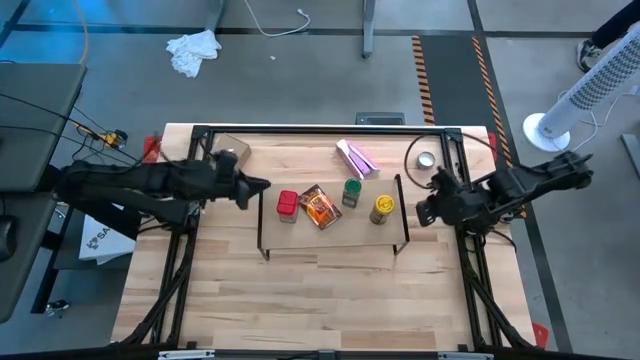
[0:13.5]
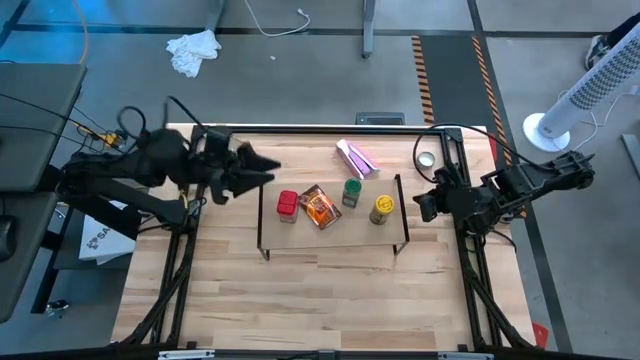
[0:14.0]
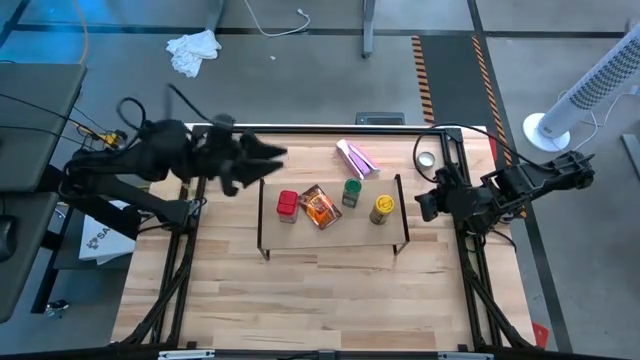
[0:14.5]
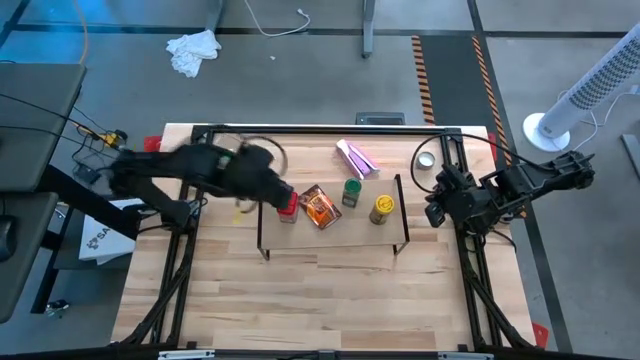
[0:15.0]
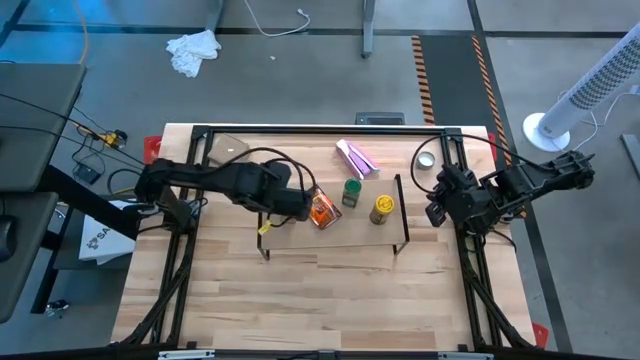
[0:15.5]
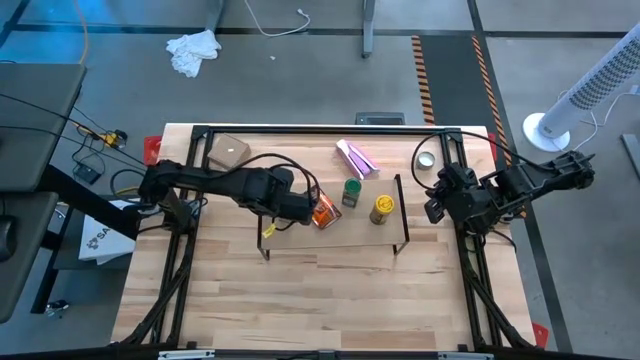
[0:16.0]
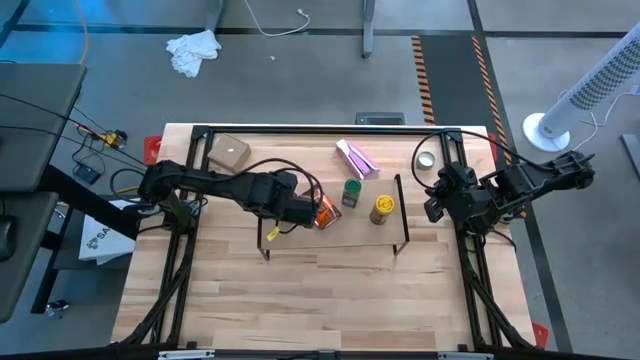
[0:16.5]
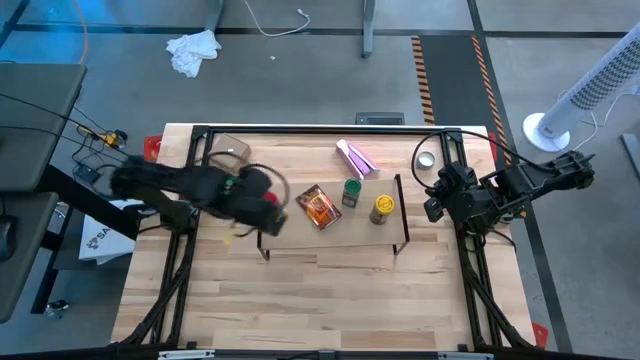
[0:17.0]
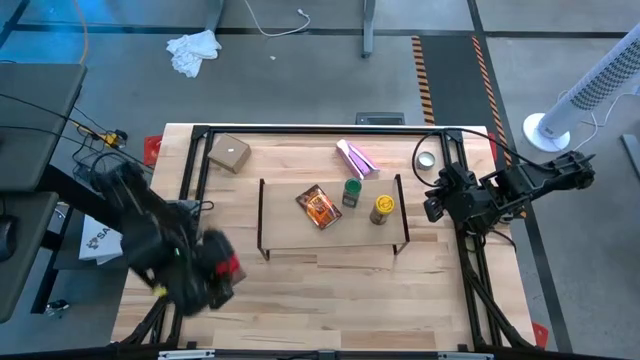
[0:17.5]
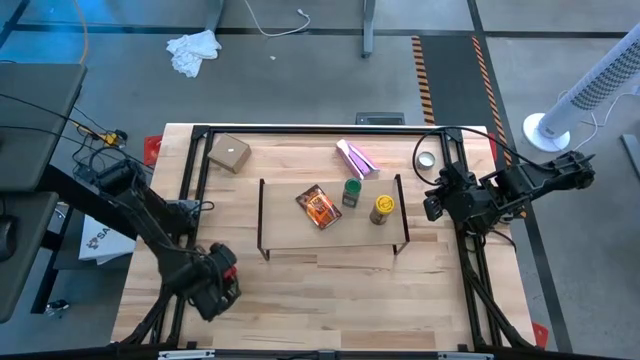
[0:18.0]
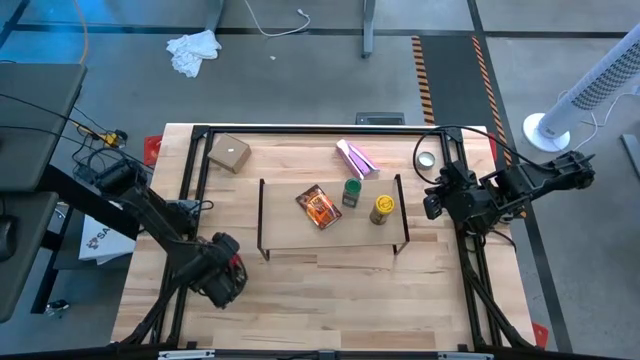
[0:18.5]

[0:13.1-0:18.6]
Task: Shelf spices
Remove the red seasoning can from the table

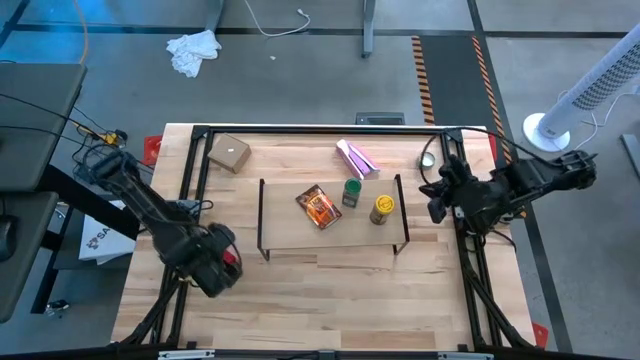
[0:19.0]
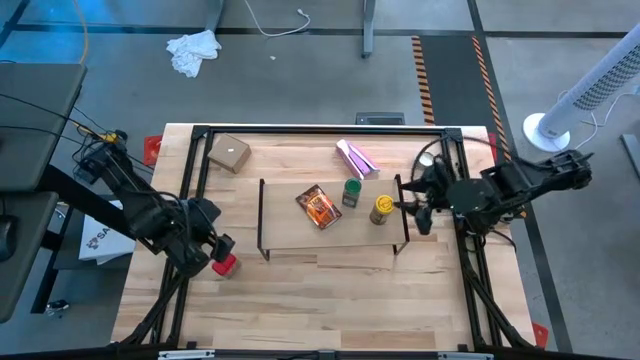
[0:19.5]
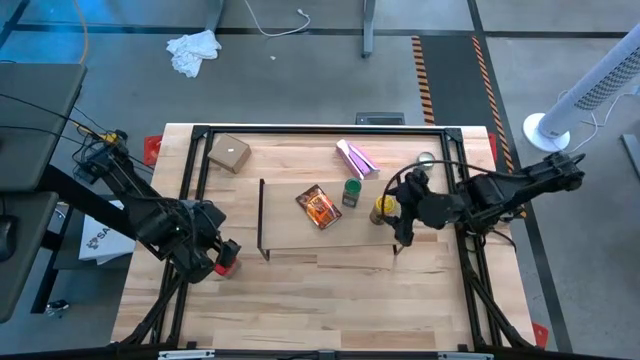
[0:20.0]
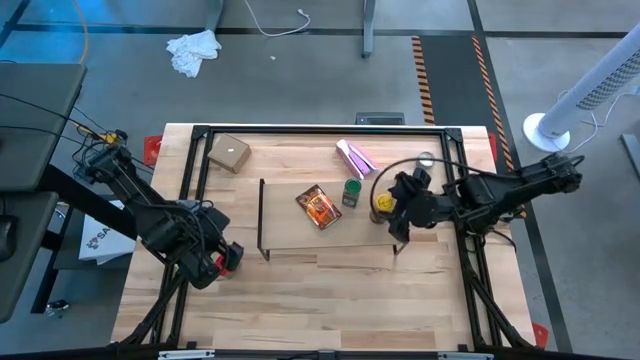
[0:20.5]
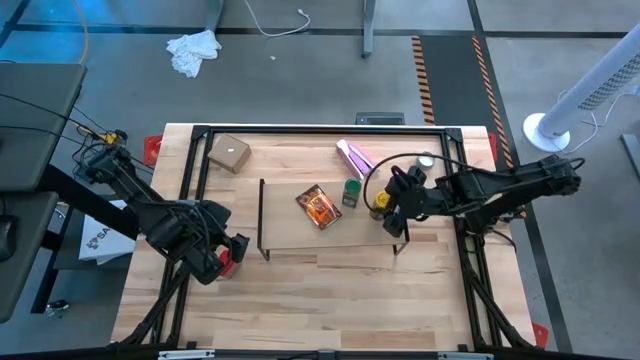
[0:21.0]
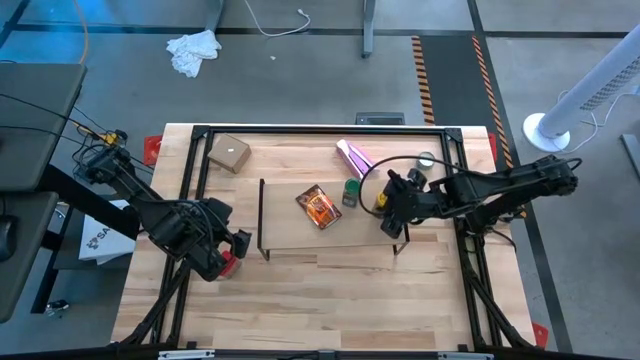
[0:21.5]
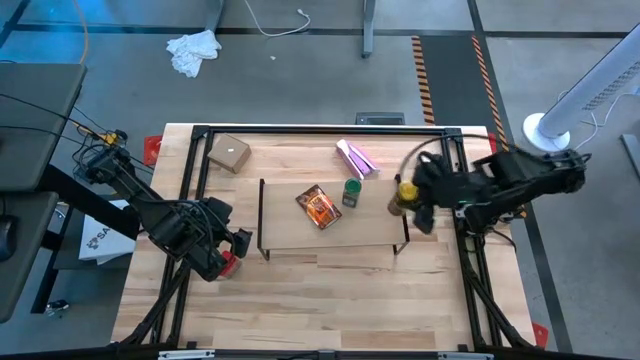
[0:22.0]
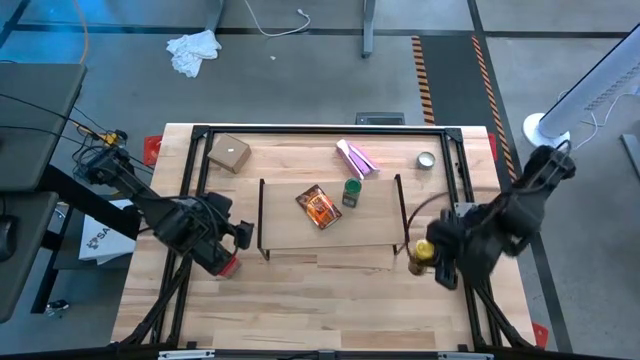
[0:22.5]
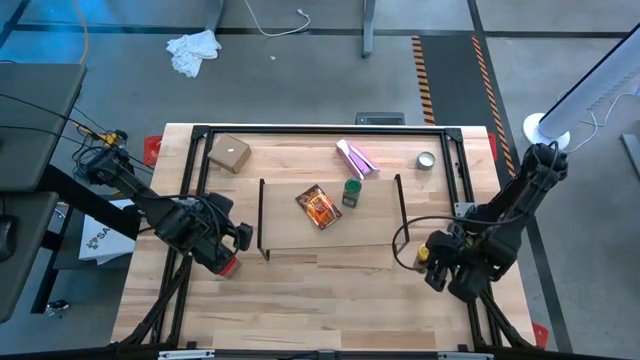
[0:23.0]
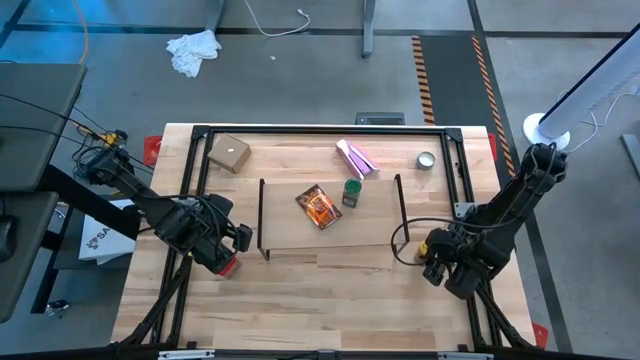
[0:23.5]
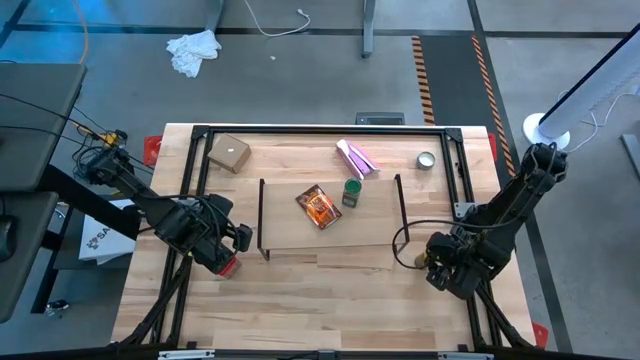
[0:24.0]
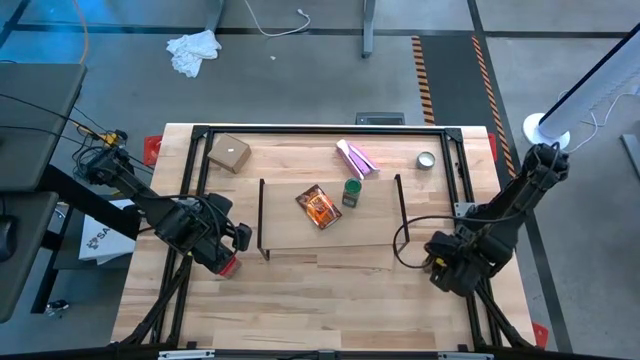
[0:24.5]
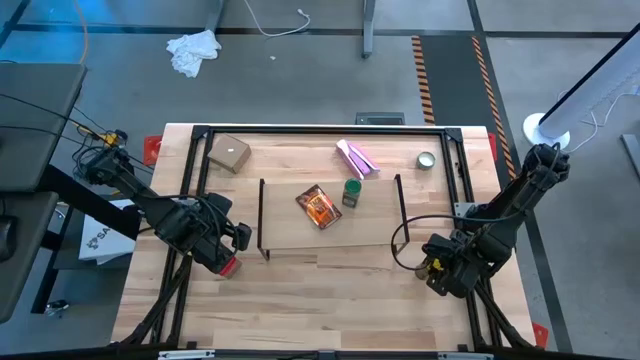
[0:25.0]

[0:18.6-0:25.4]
Remove the yellow seasoning bottle from the shelf

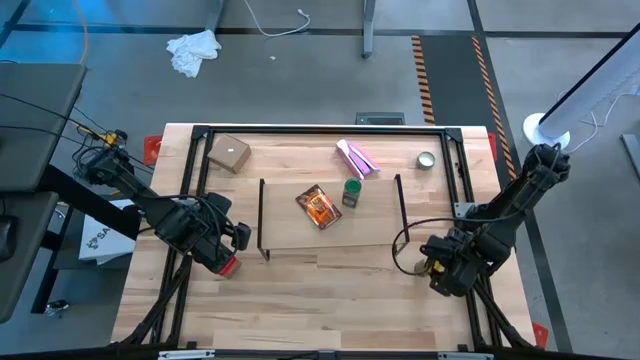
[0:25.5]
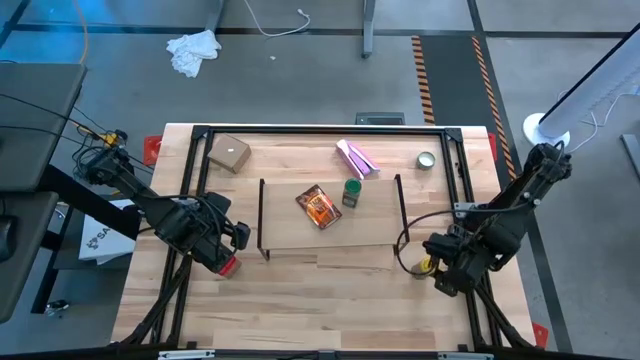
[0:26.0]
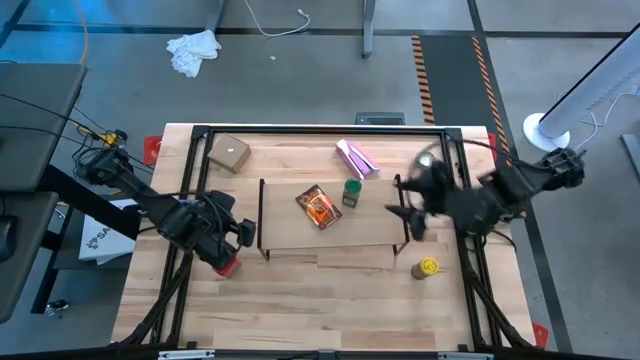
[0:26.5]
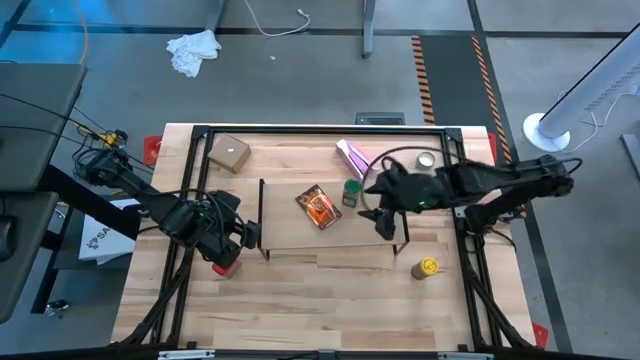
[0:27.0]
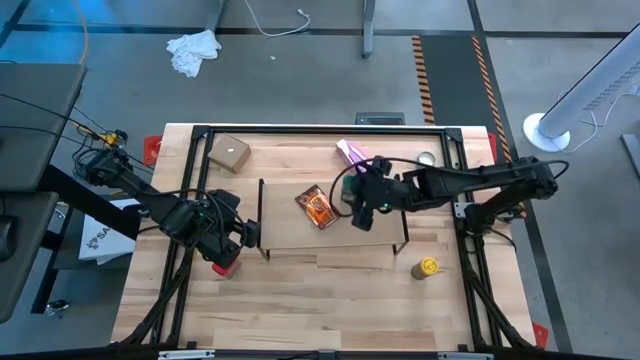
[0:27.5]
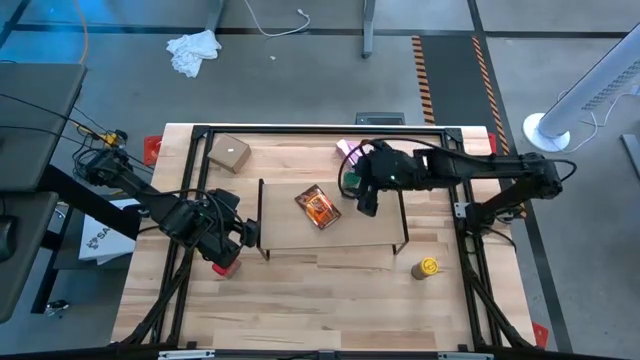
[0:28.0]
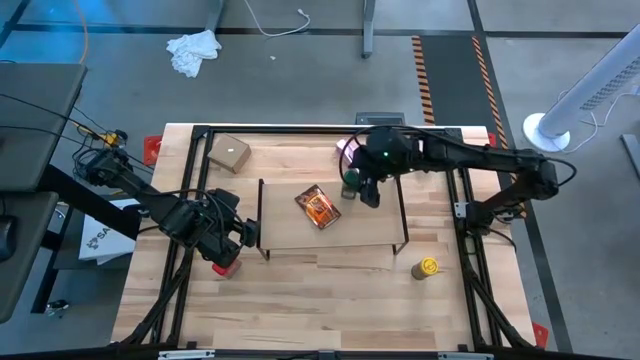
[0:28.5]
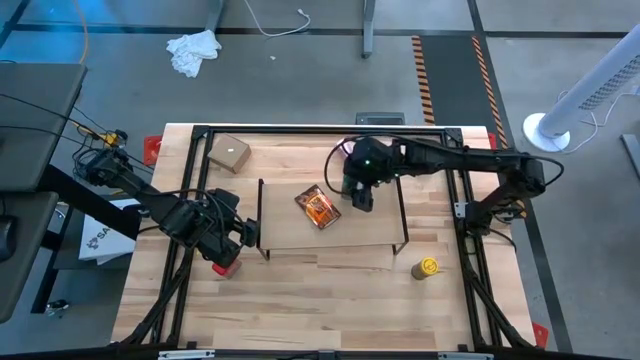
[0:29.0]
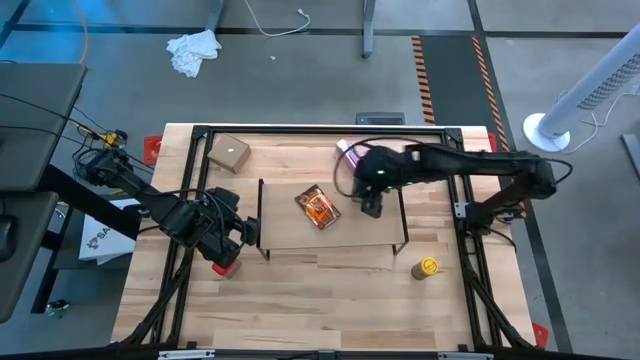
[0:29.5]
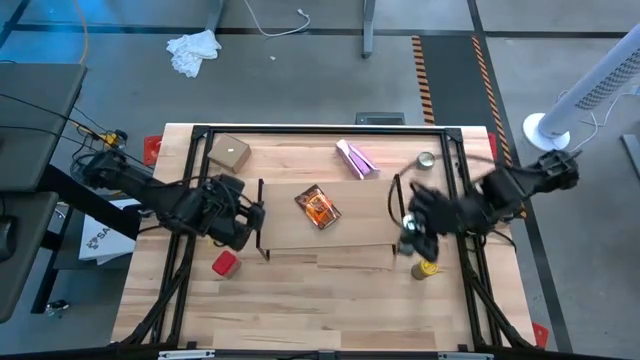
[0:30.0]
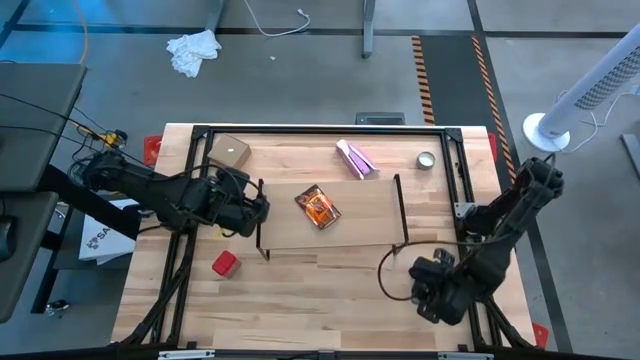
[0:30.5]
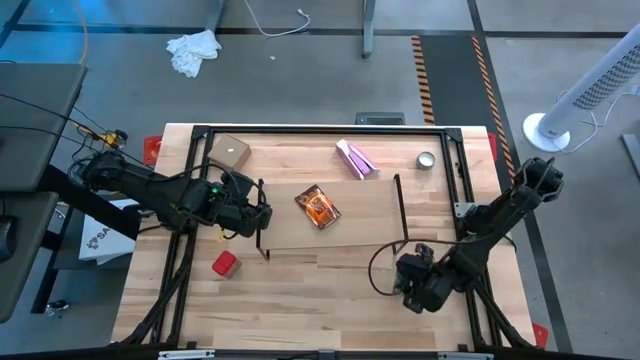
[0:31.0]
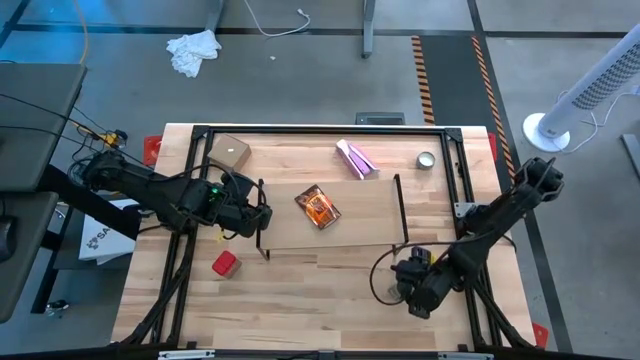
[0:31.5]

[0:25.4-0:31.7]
Remove the green seasoning bottle from the shelf

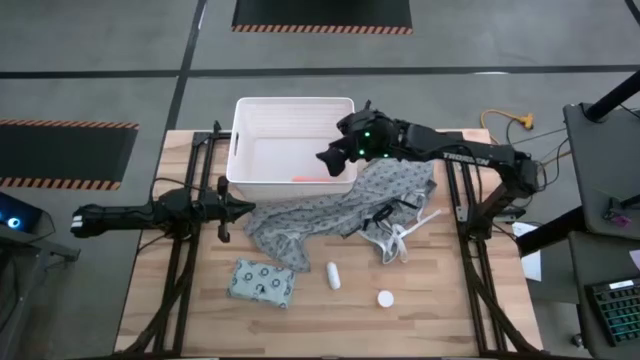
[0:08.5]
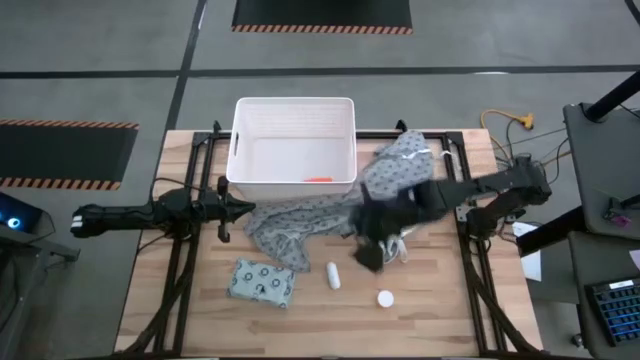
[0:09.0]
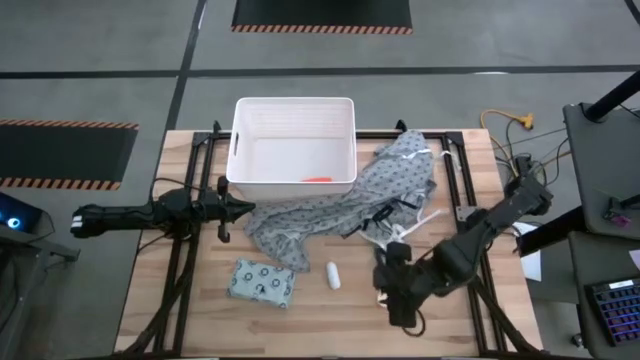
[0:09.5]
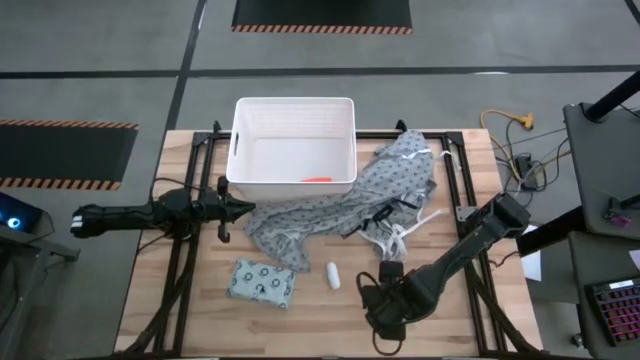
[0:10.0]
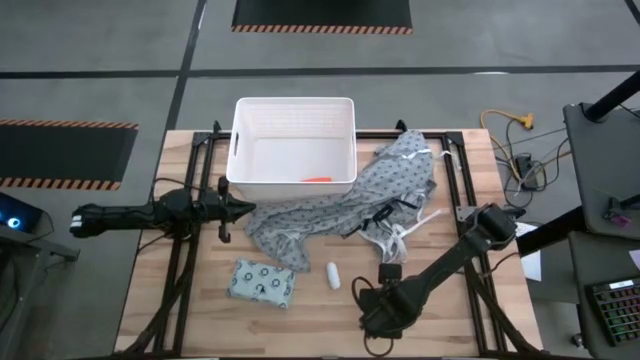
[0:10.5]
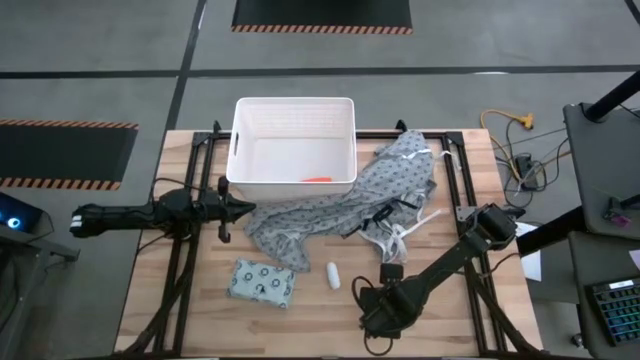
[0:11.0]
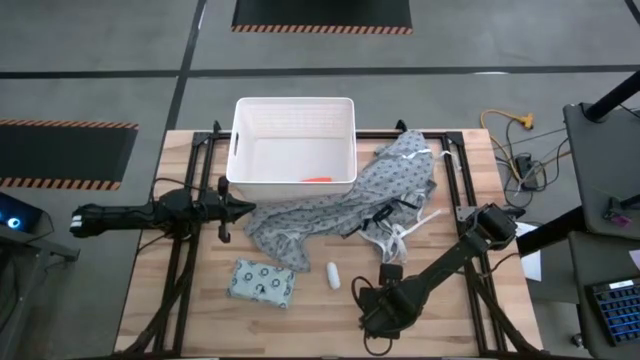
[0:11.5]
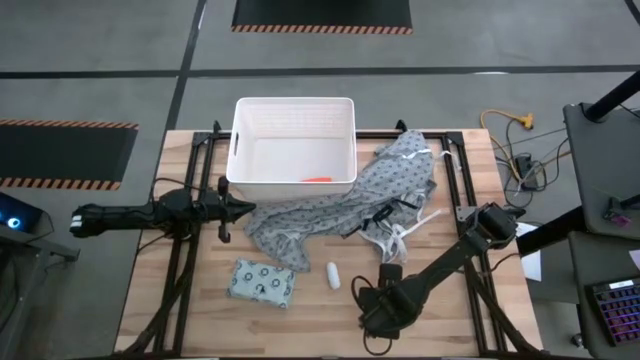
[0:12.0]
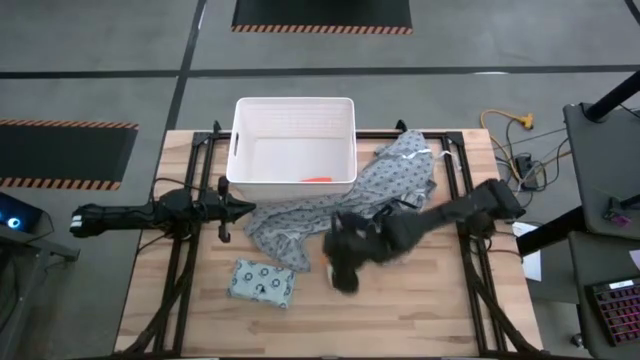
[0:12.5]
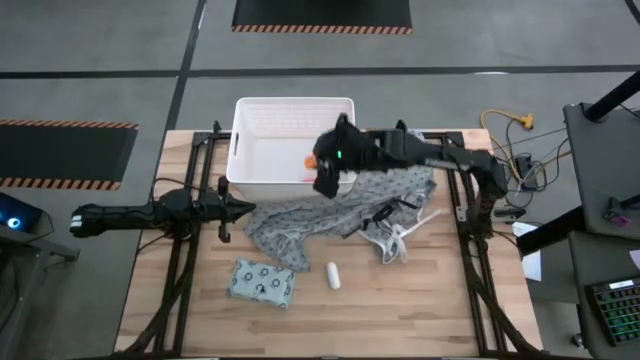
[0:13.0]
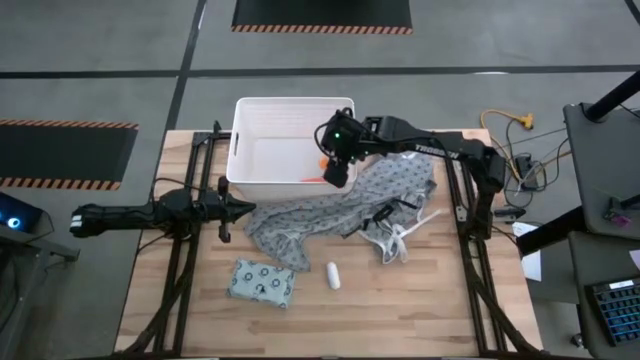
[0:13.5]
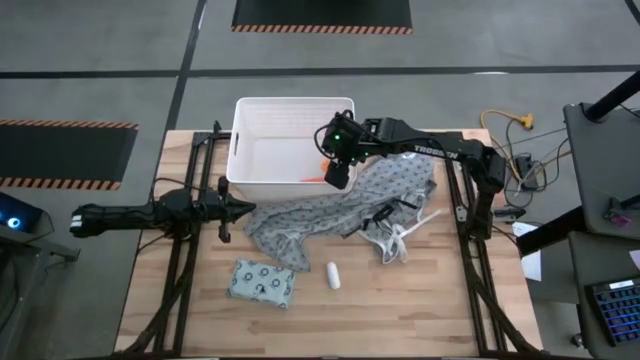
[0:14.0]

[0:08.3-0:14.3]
Task: Pick & place medical supplies in basket/bin
Put the orange pill bottle into the white bin
